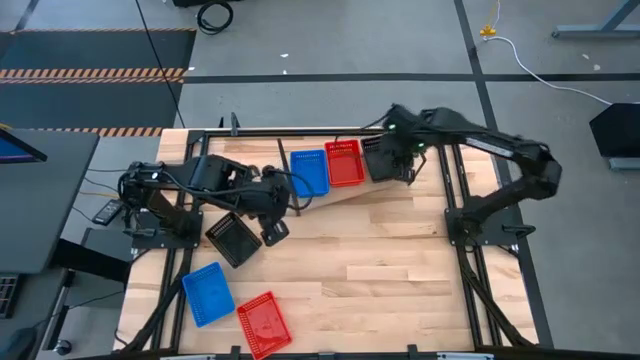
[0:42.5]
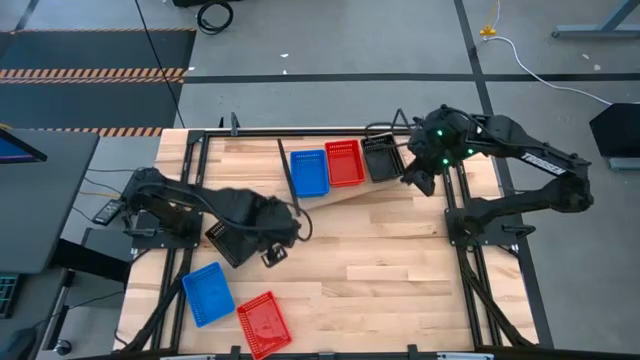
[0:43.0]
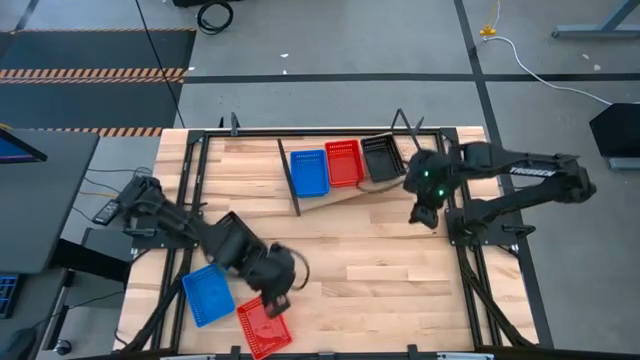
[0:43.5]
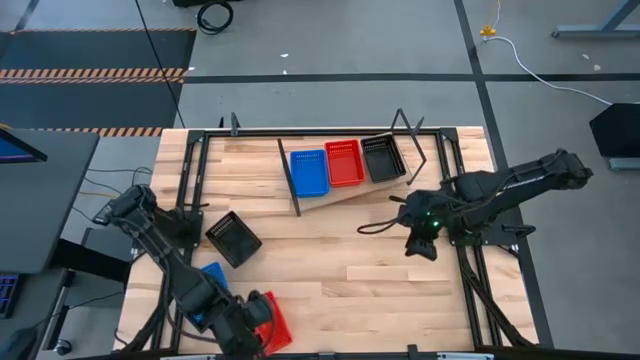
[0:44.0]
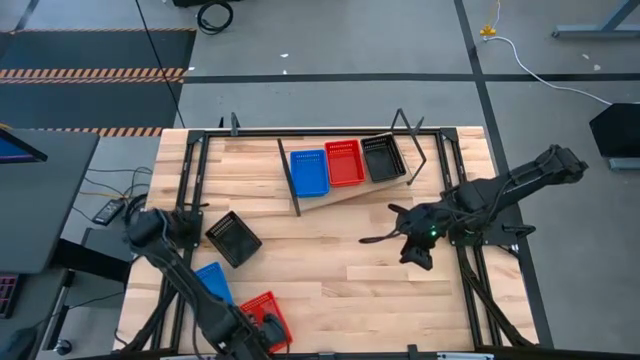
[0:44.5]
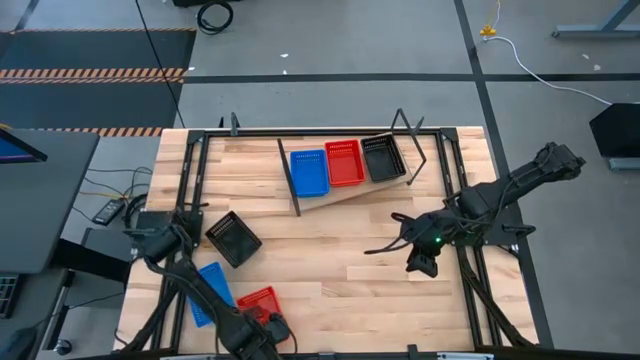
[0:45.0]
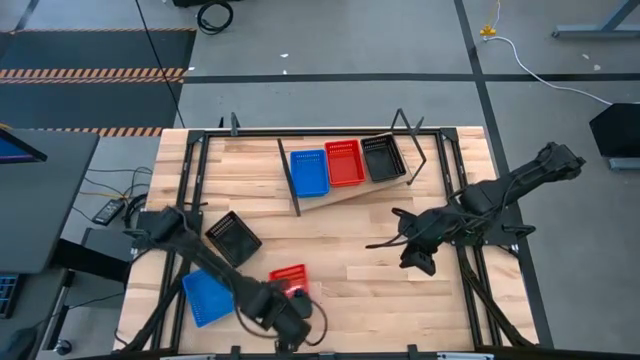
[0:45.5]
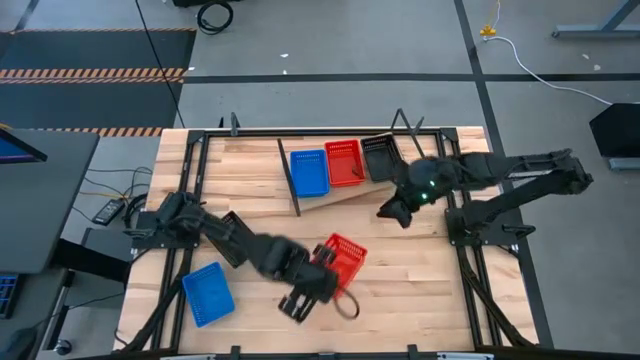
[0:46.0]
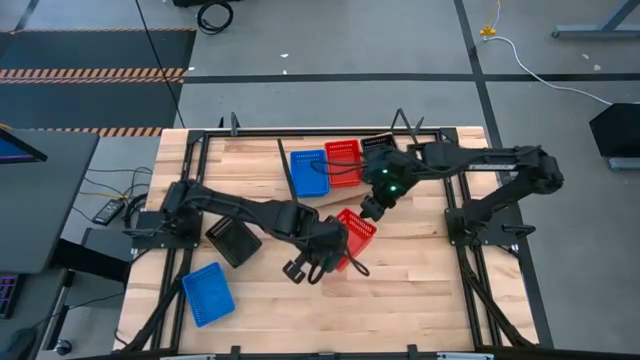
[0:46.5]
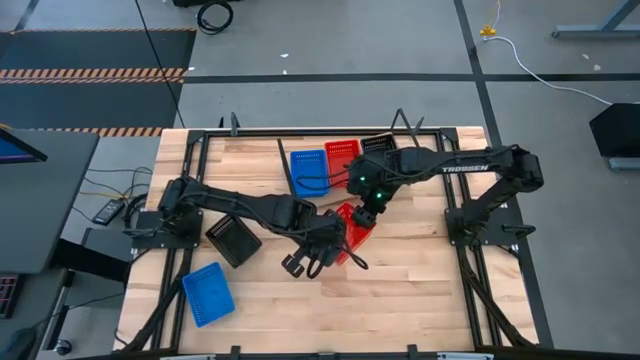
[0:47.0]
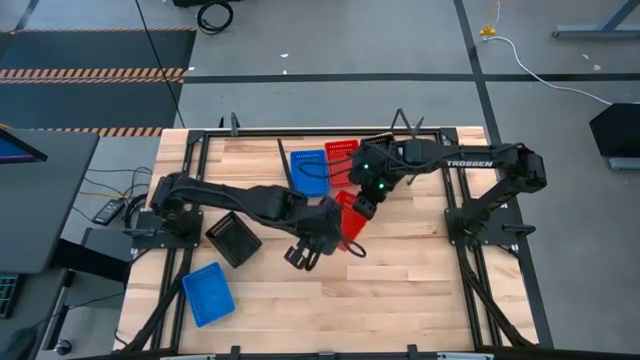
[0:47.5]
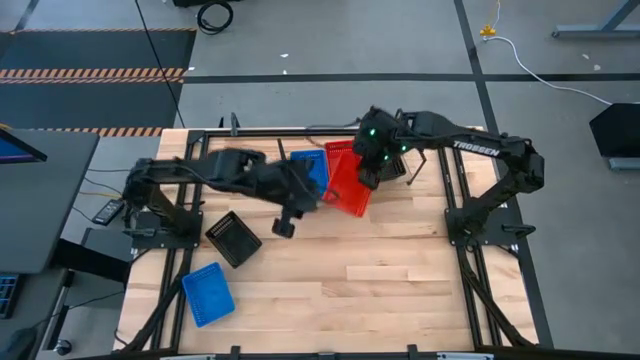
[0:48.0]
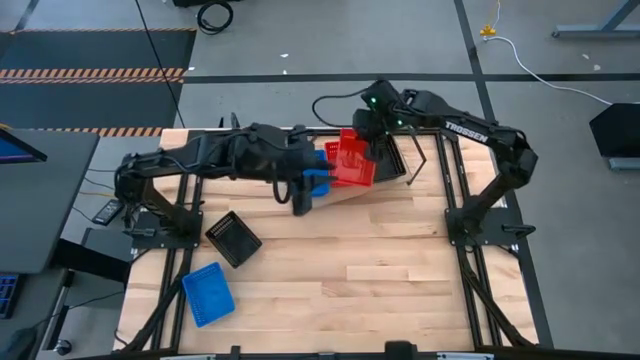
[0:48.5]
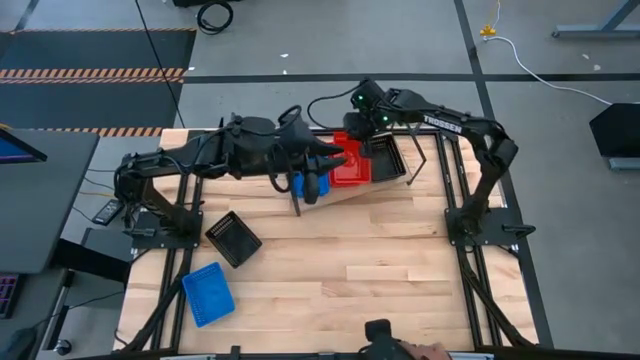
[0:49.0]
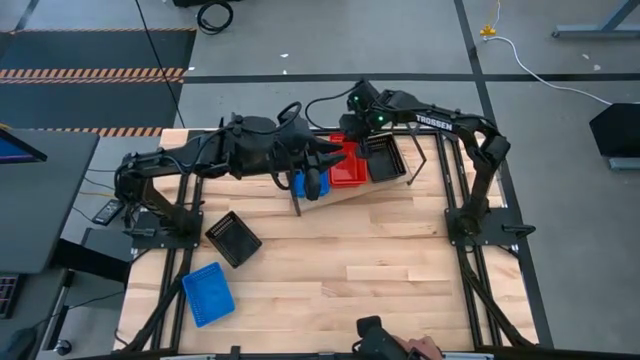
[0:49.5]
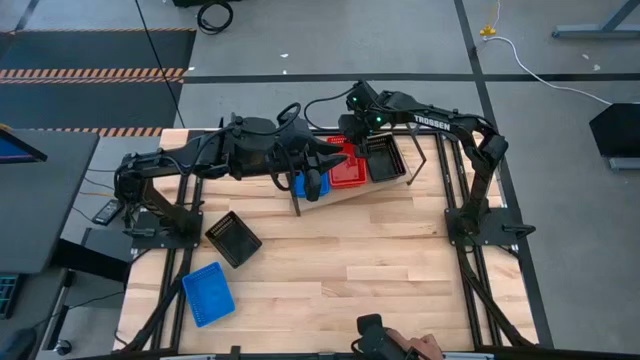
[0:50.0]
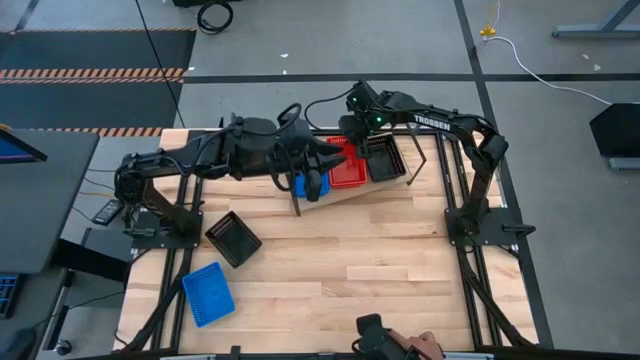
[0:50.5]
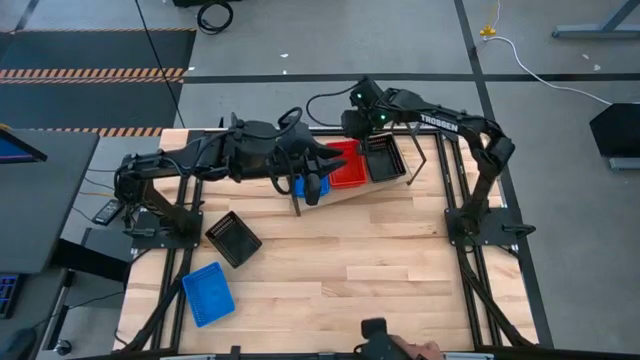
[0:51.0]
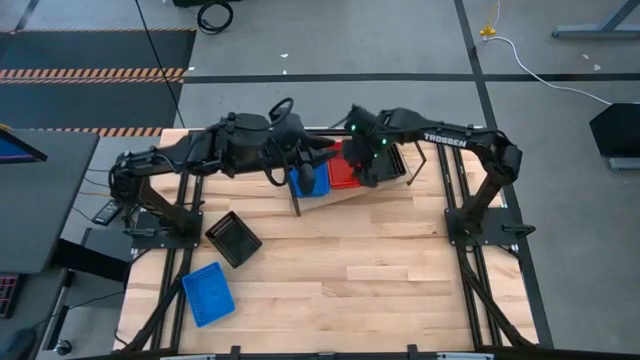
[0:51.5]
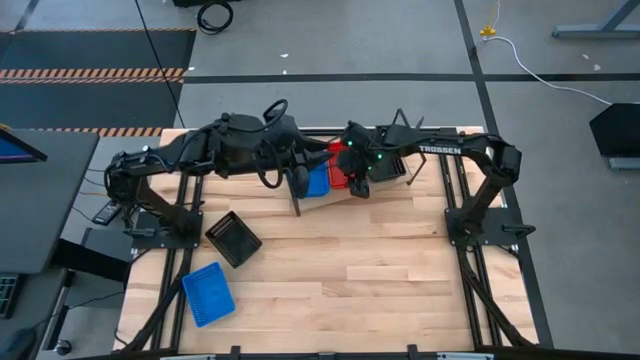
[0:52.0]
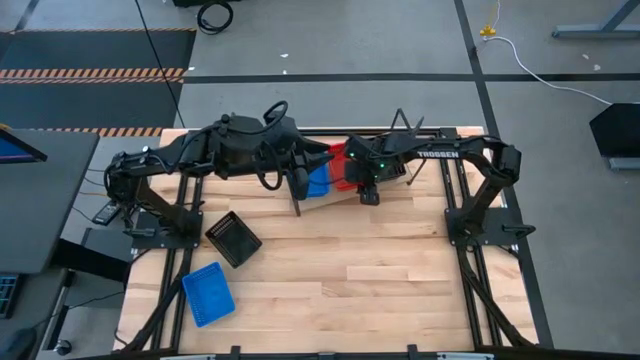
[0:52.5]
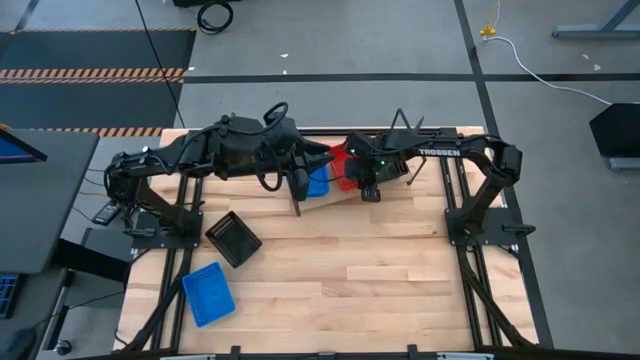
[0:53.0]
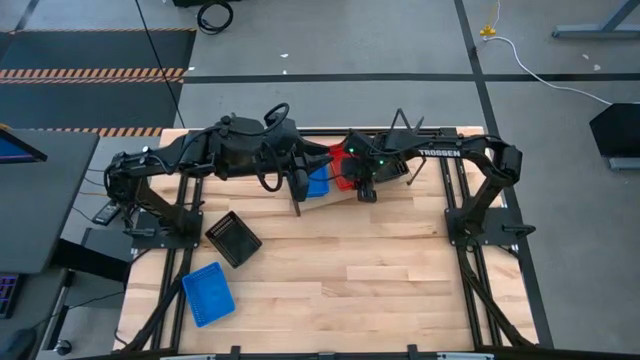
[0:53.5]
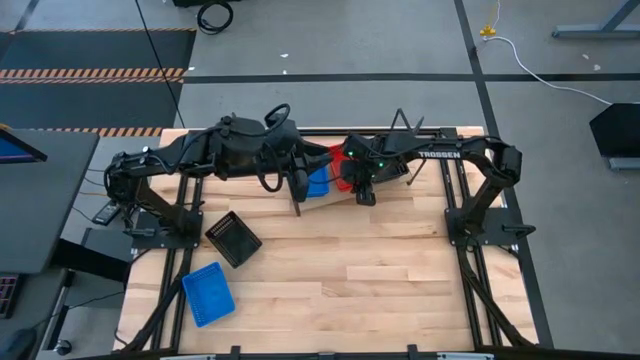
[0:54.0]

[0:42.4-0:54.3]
Task: Stack baskets on shelf by color
Stack the red bin on the stacked red bins on the shelf

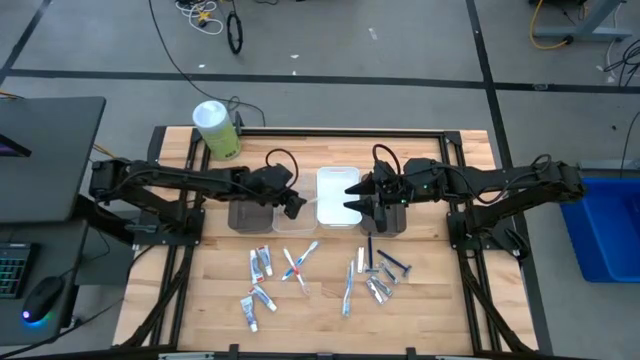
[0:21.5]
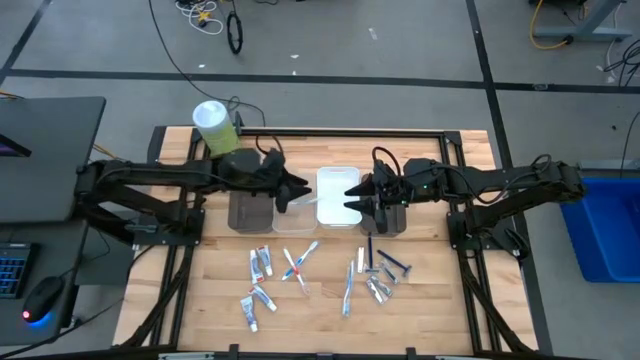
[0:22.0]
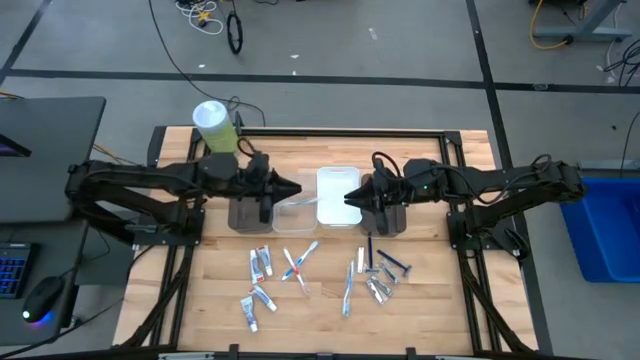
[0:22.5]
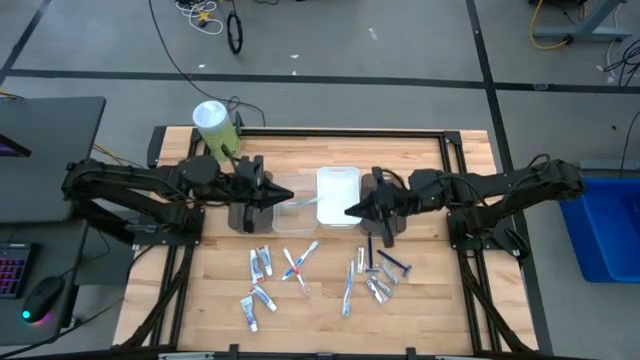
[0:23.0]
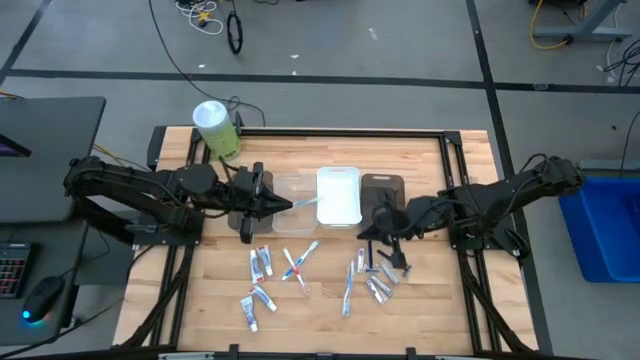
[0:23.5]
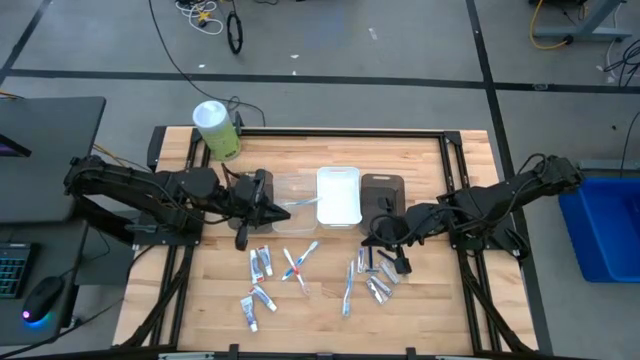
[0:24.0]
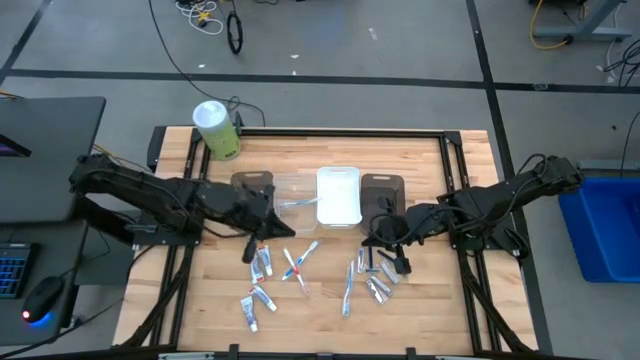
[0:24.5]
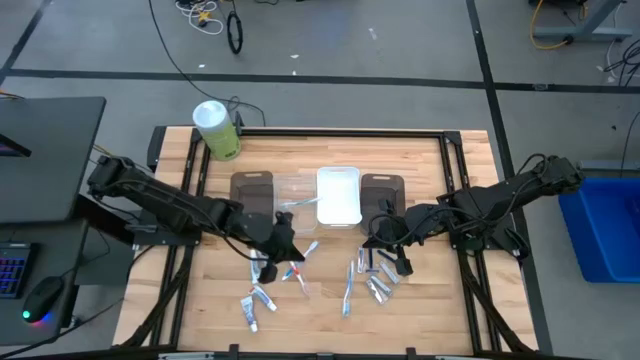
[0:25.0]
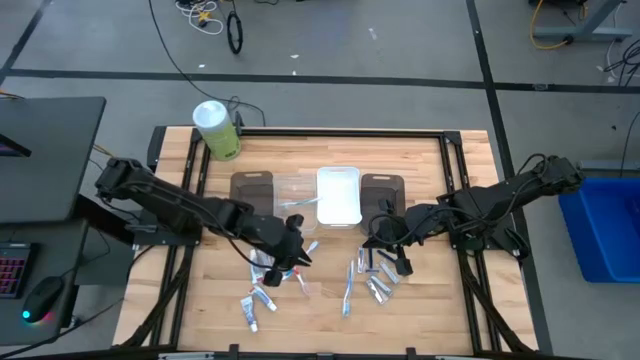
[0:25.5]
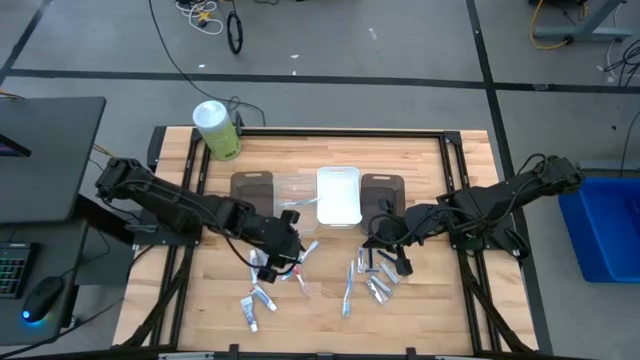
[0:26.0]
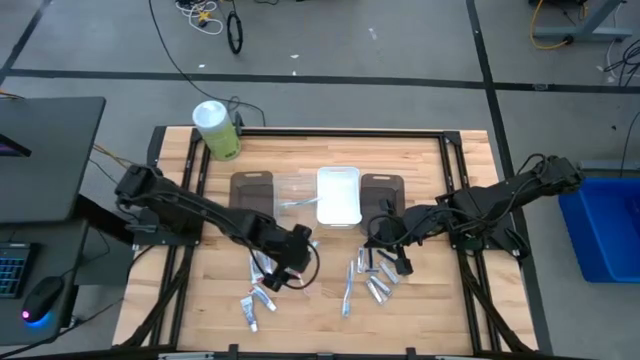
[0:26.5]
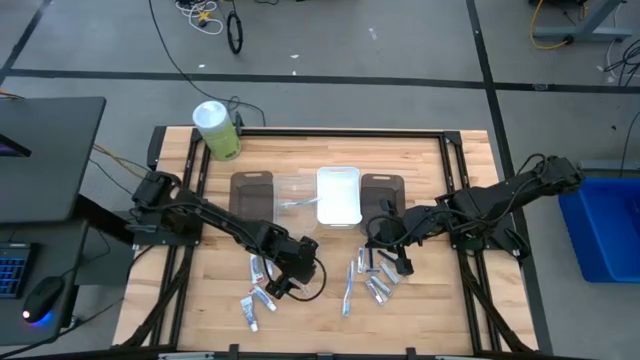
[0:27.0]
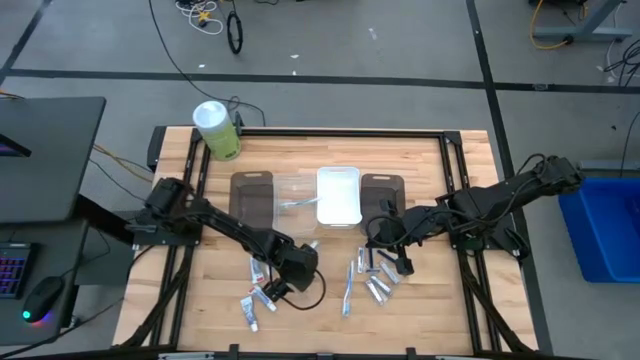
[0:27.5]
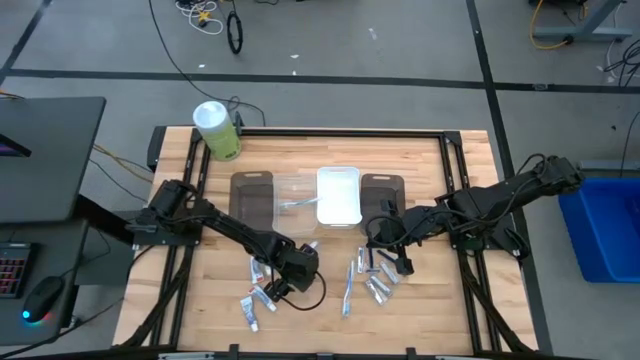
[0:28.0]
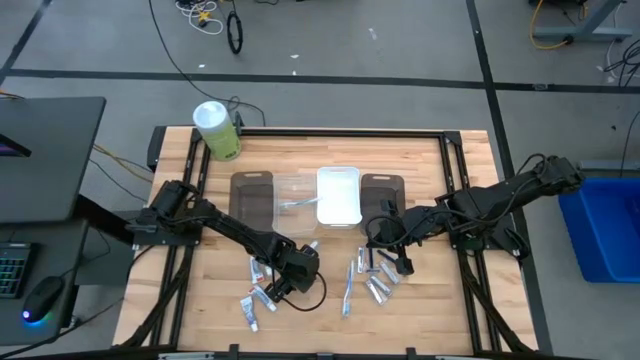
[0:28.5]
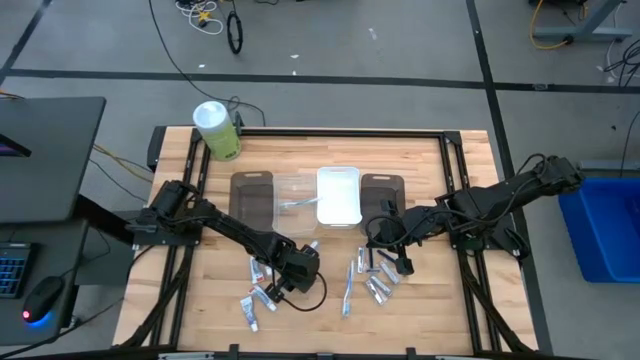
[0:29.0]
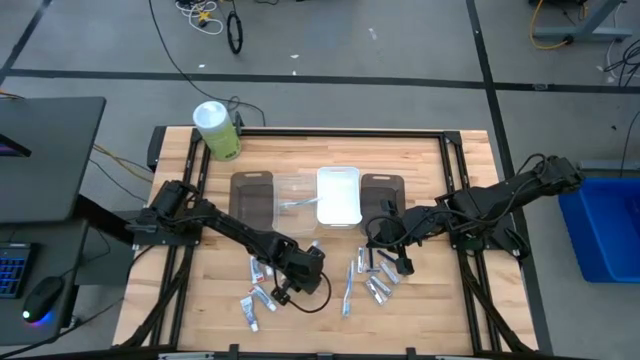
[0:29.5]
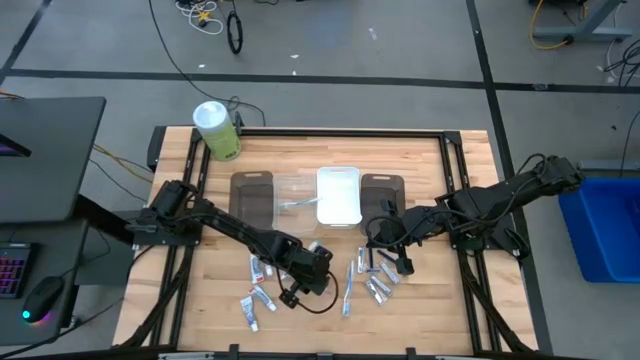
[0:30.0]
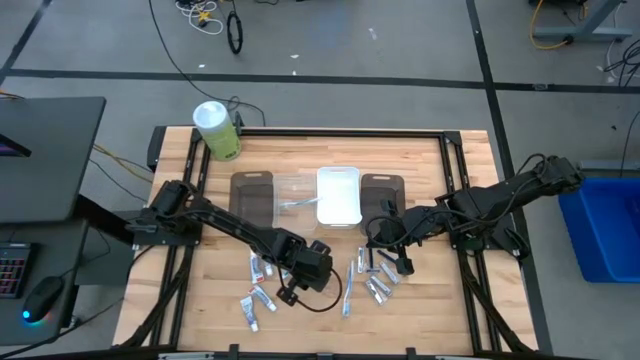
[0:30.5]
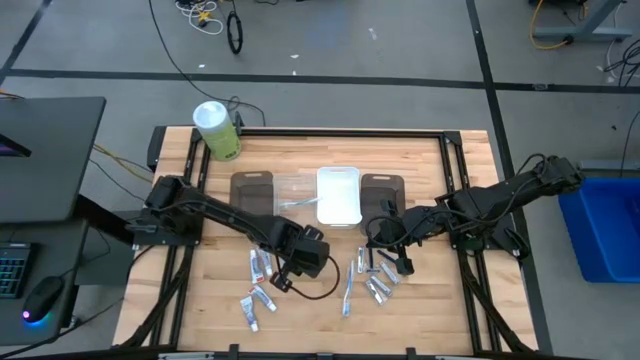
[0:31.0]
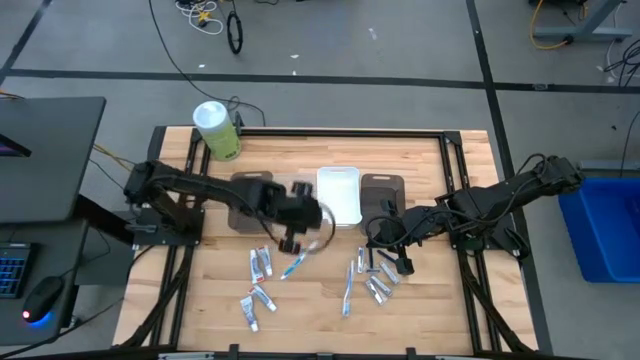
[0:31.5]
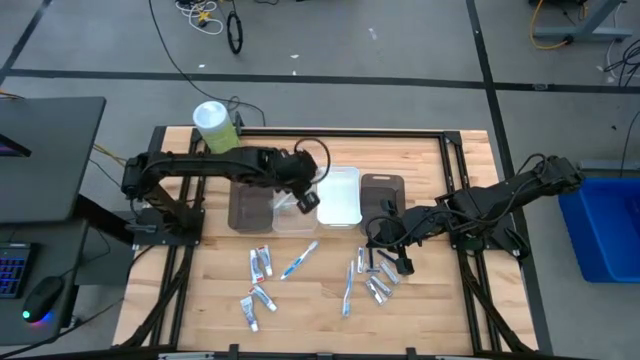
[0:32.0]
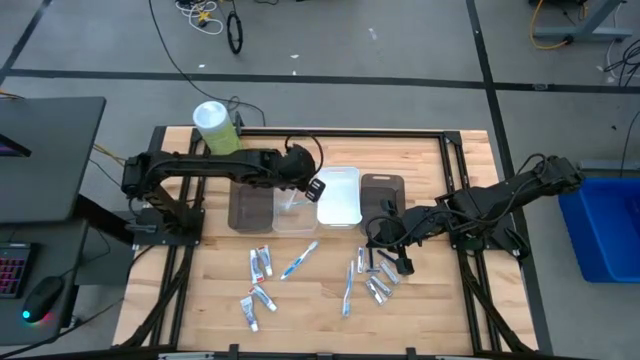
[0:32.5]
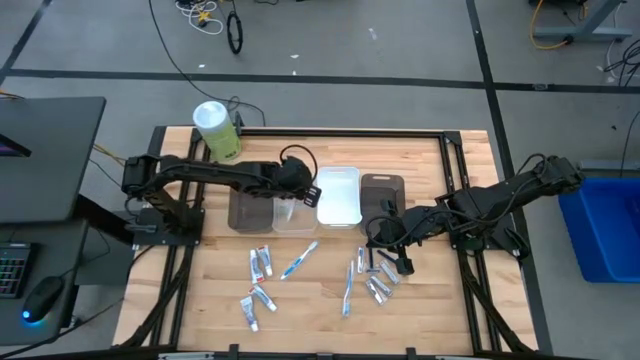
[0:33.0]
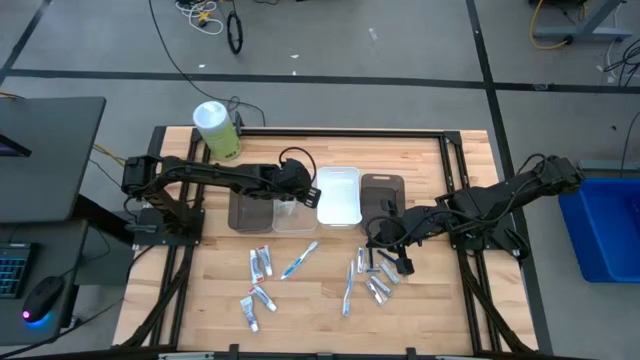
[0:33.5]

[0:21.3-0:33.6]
Task: Pick & Place Travel size toiletries
Put the orange toothbrush into the transparent bin
